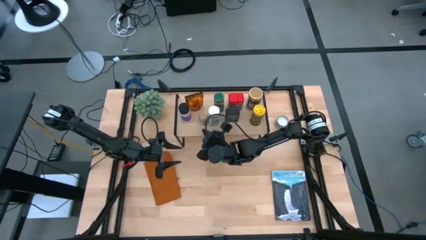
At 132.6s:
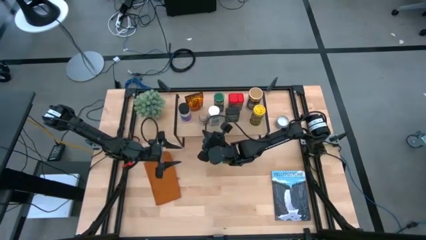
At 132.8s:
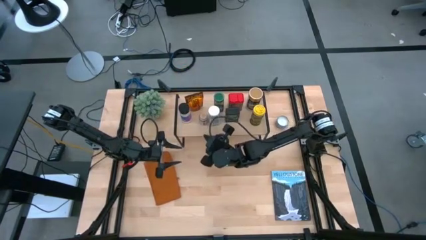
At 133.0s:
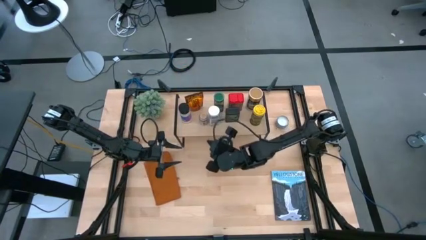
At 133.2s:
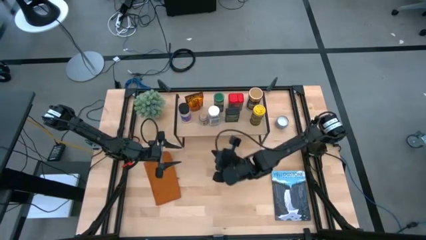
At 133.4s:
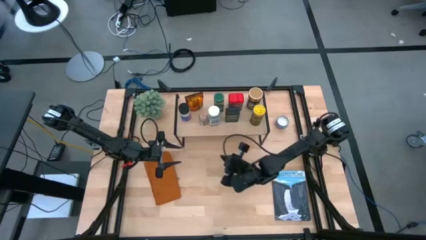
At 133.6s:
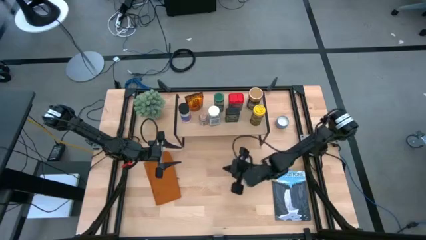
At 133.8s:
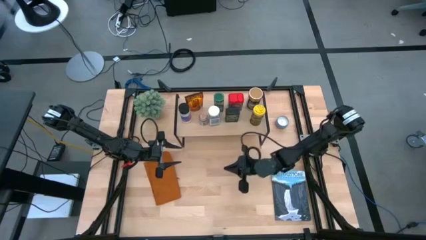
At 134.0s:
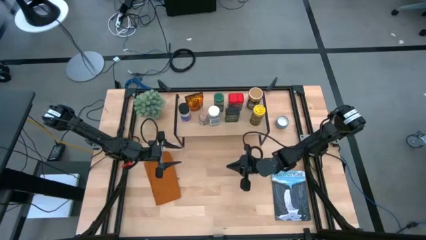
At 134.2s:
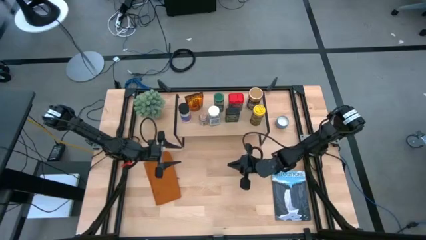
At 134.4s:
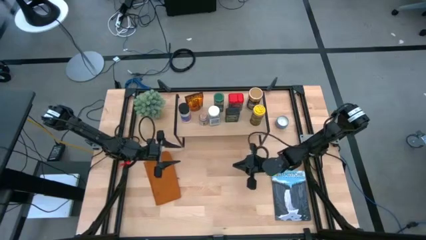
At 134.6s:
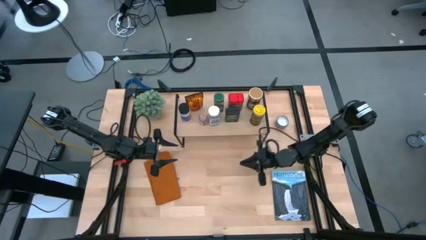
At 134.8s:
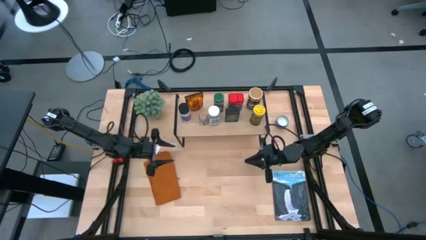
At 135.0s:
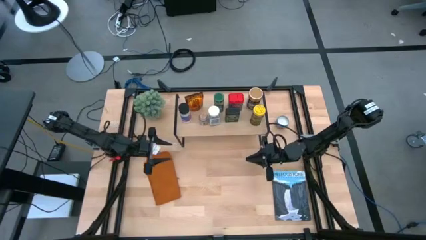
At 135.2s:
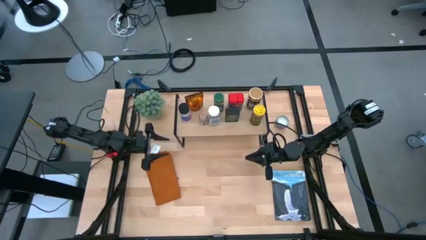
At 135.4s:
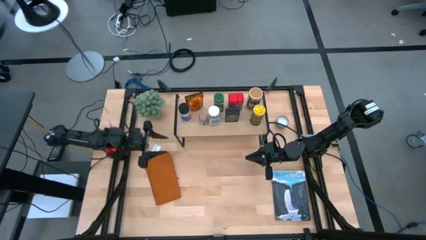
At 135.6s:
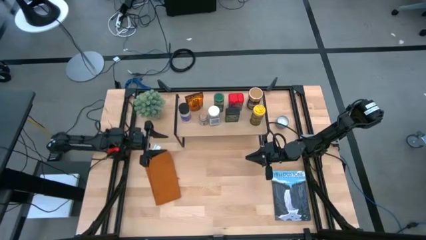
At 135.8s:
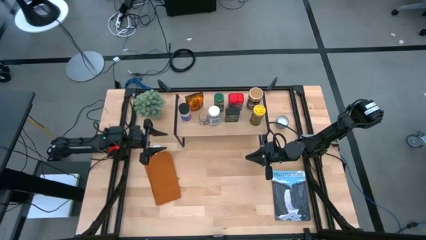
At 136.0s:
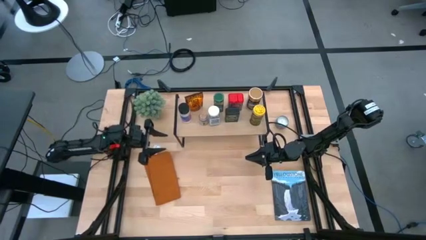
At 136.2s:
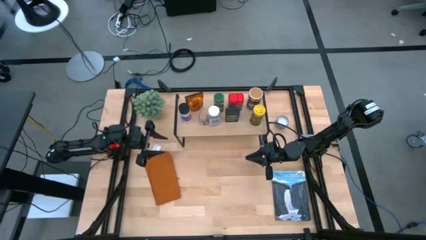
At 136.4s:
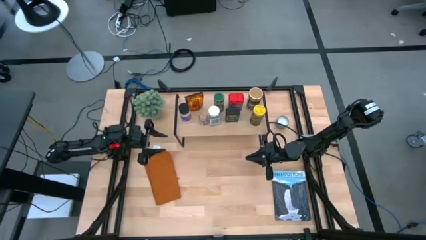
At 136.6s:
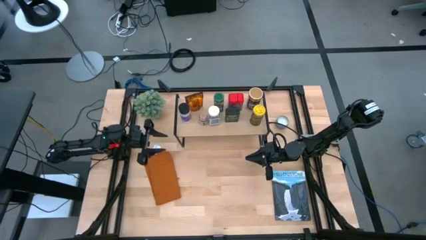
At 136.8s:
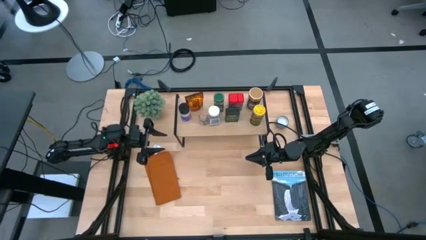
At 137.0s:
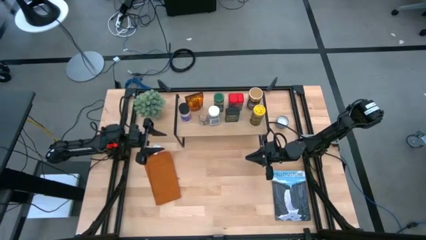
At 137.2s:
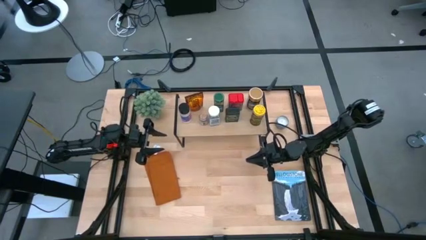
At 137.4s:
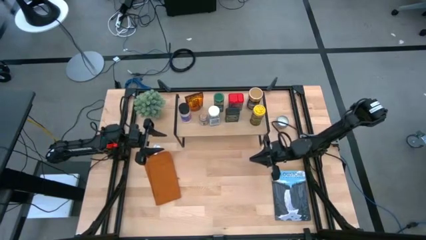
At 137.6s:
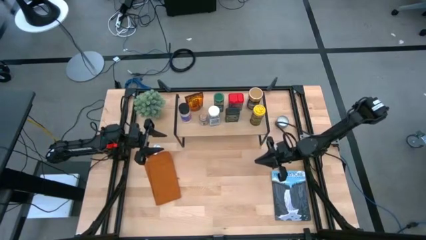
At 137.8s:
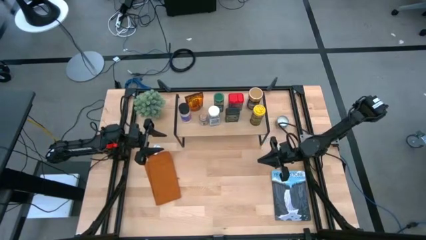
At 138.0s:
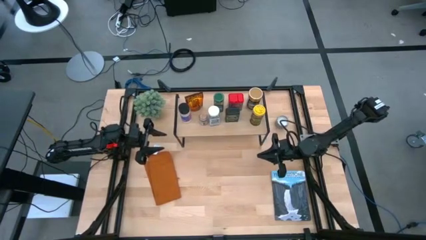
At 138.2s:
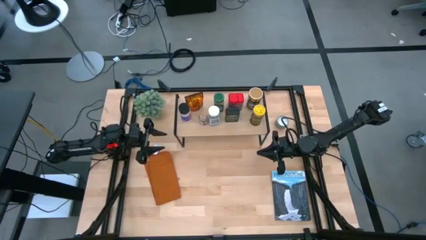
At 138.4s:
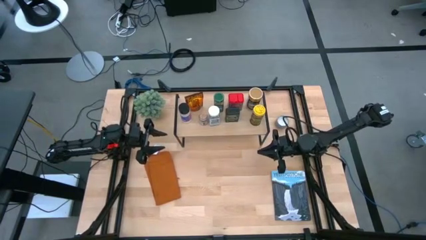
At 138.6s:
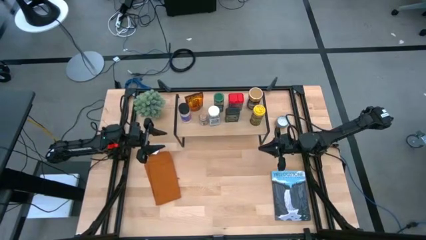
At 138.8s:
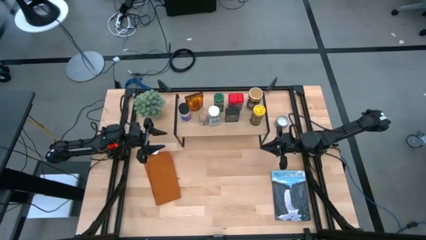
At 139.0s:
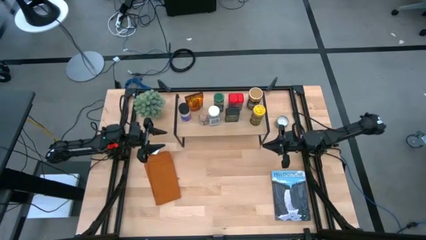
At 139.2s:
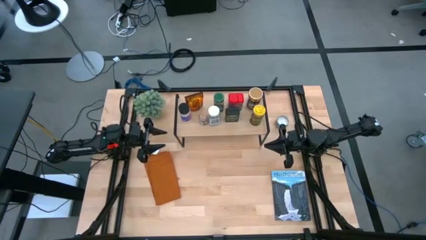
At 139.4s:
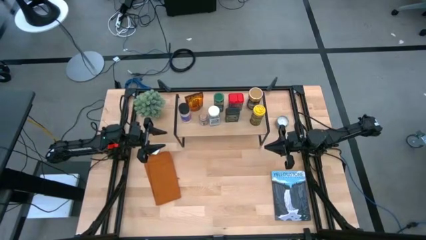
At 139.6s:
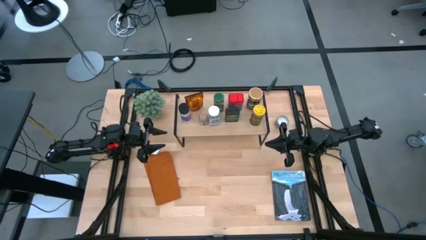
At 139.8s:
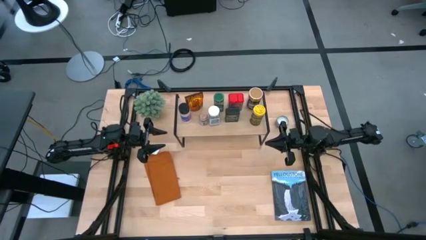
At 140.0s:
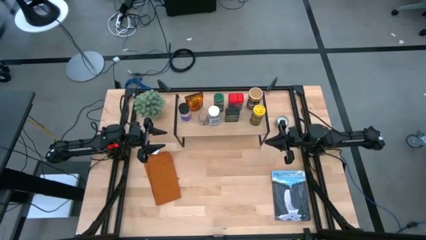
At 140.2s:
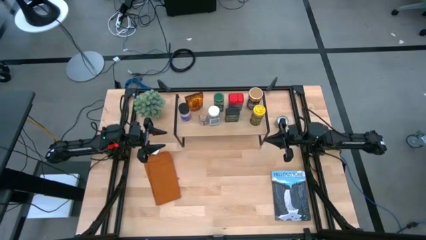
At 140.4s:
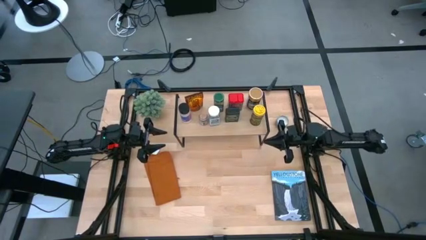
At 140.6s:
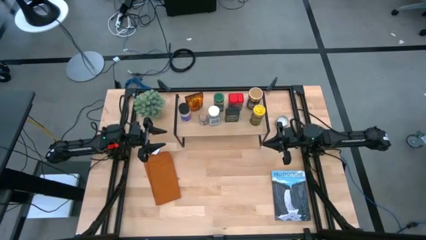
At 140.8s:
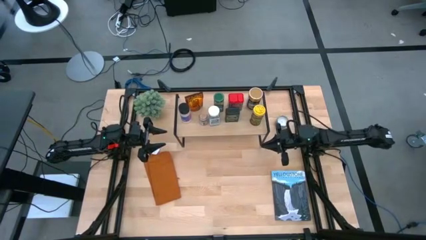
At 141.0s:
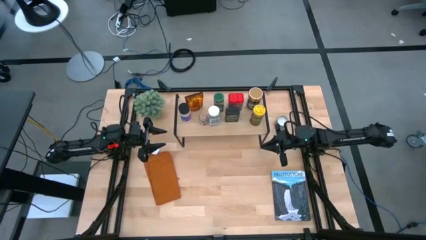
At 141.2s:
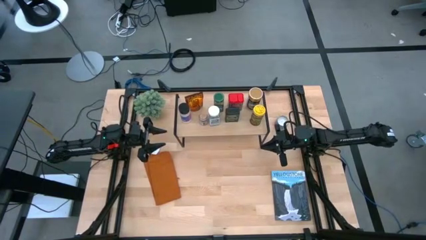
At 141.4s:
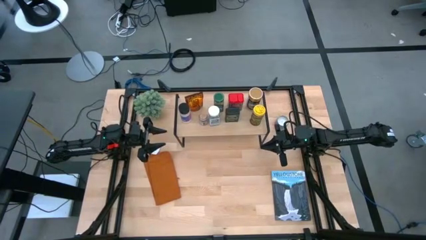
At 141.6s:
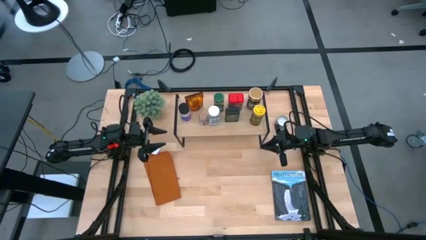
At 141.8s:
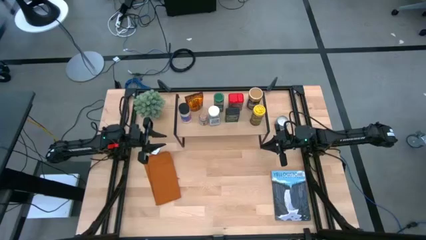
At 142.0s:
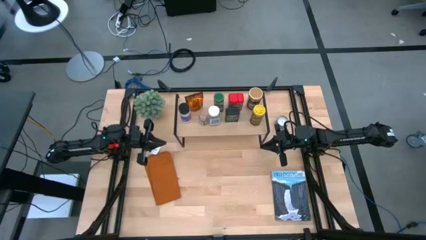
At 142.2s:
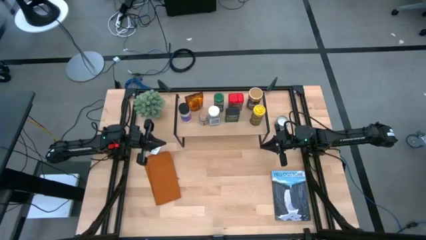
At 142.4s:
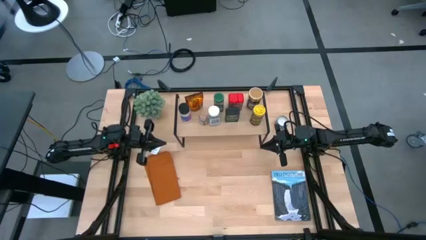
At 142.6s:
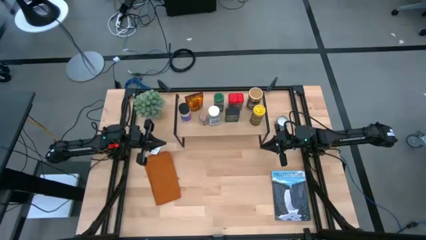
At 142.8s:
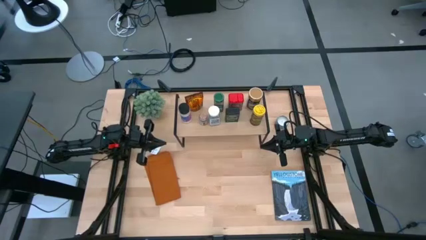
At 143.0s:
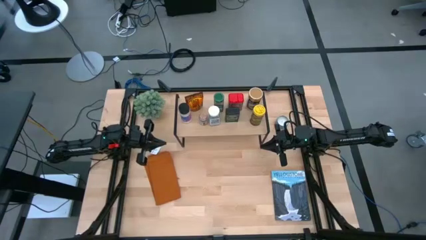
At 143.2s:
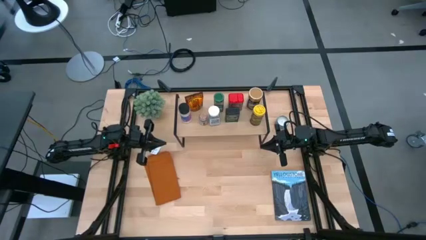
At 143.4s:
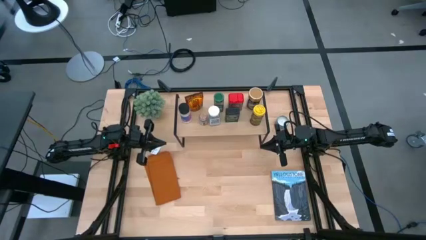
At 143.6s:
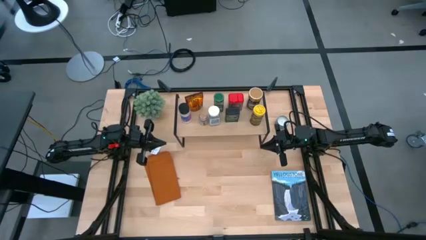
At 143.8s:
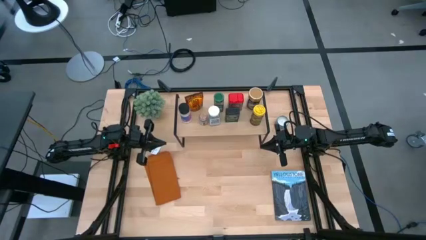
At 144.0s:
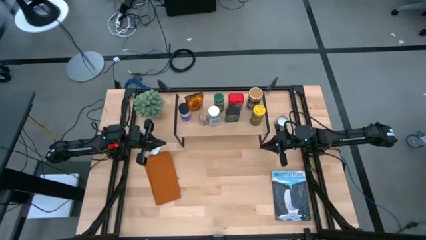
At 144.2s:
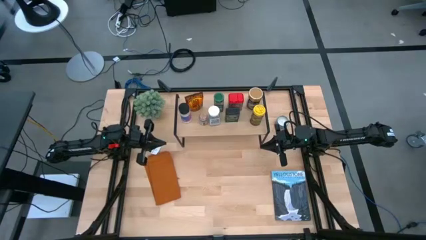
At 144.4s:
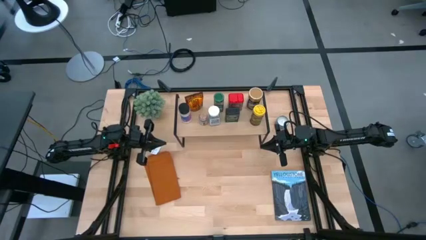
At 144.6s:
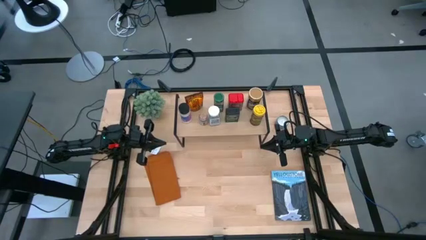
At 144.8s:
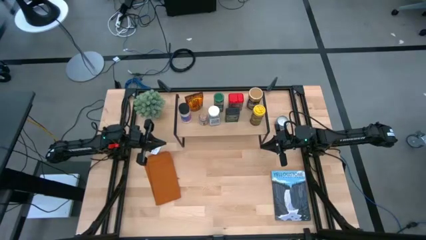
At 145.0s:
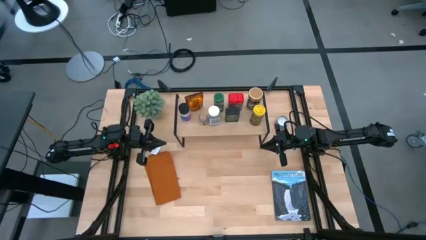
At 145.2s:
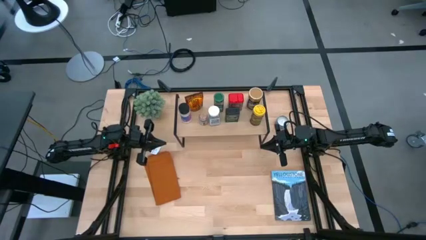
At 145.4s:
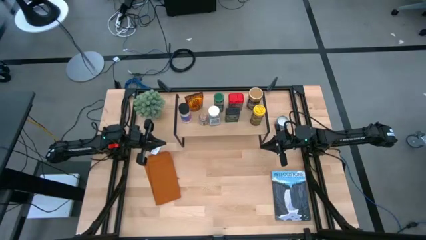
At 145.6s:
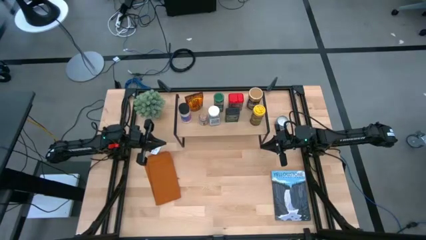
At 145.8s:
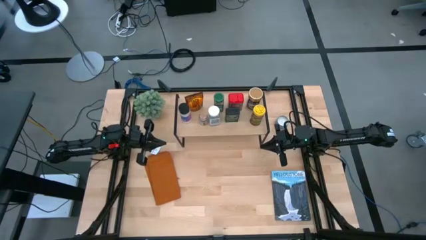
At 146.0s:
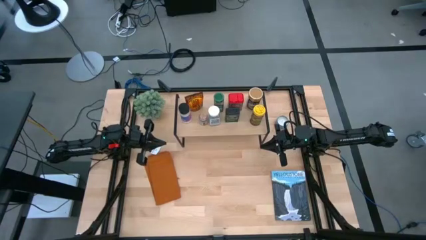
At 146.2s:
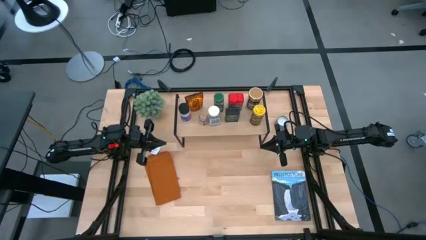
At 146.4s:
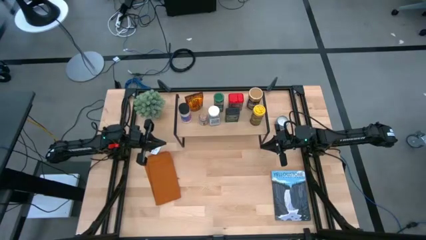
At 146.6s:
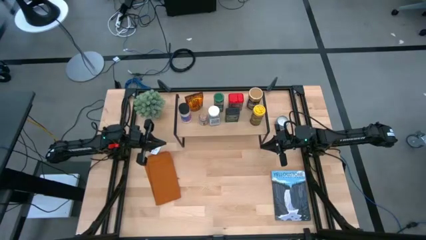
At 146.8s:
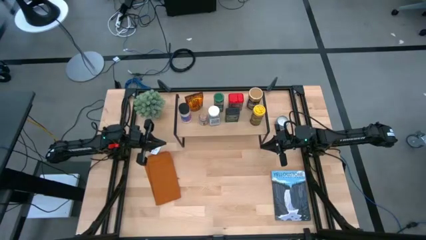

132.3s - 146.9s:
Task: Shelf spices
Return to Home Position

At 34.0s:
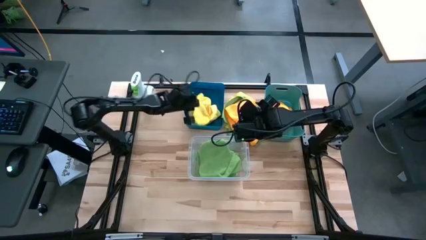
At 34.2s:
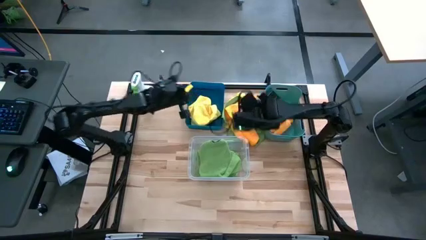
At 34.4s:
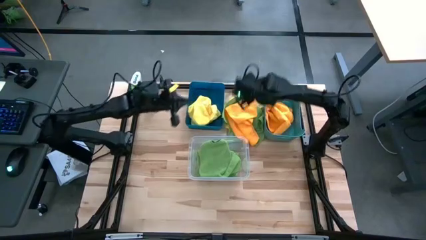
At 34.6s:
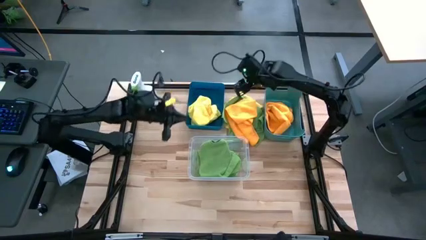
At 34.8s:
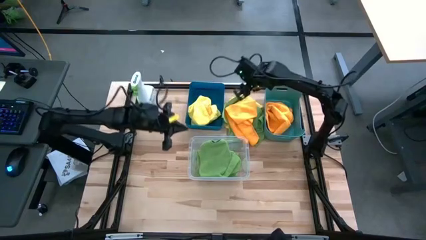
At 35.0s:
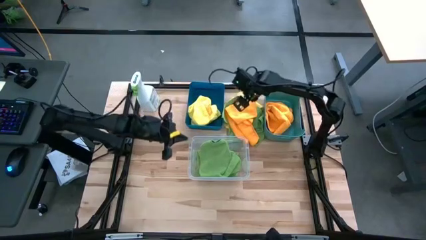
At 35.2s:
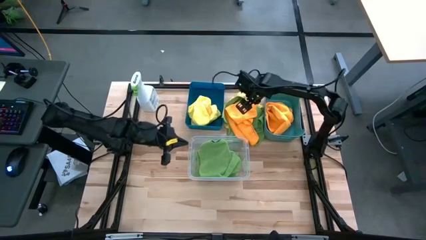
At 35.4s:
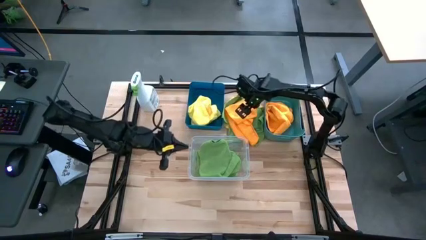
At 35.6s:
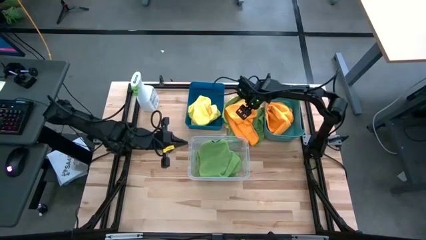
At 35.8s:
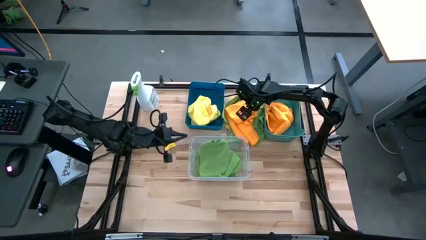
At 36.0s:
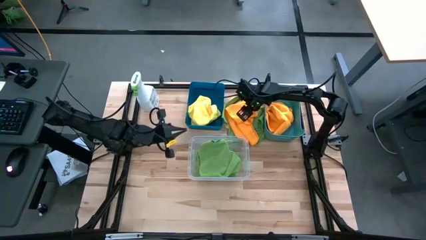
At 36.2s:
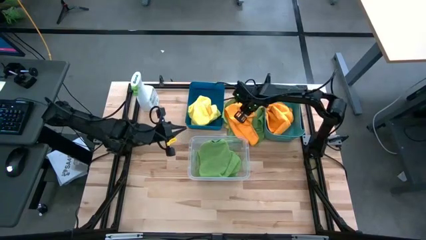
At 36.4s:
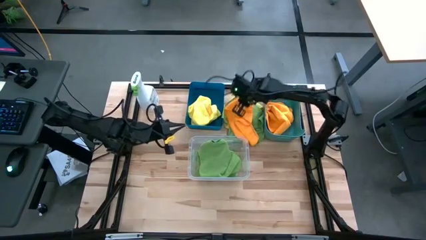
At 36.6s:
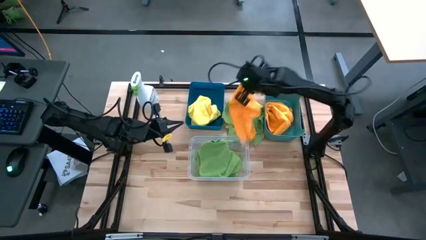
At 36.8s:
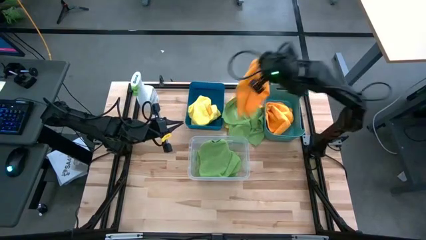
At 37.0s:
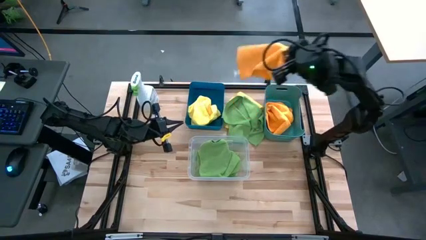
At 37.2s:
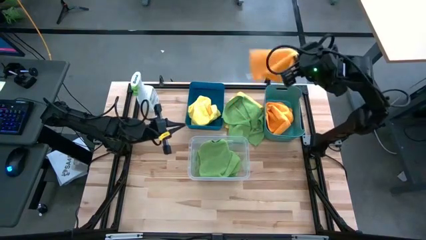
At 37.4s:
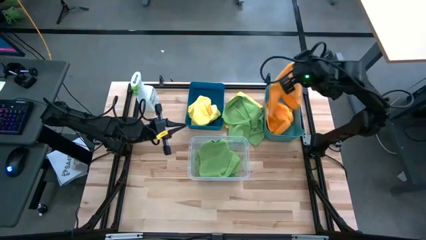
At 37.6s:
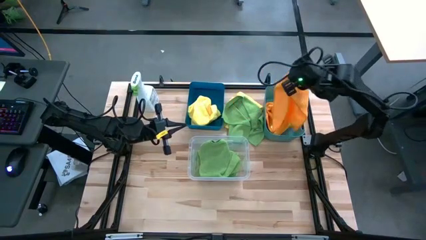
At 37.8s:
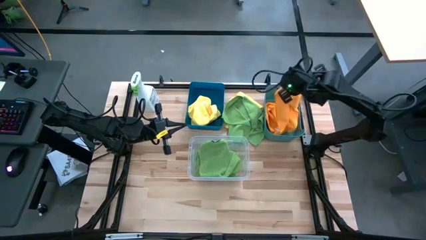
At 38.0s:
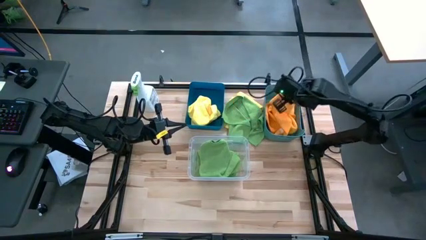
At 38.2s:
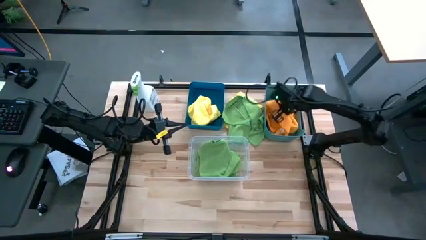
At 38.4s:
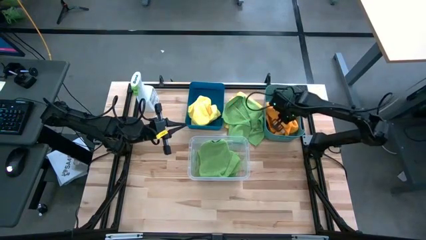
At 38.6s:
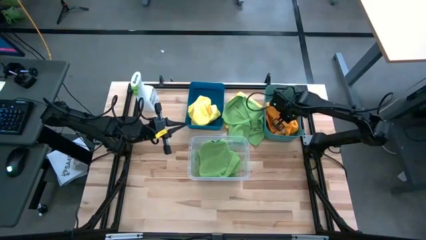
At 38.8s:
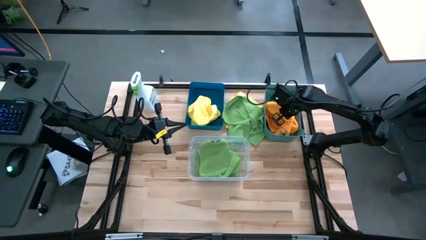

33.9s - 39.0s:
Task: Sort microfiber towel by color & place in baskets
Put the orange towel into the green bin
